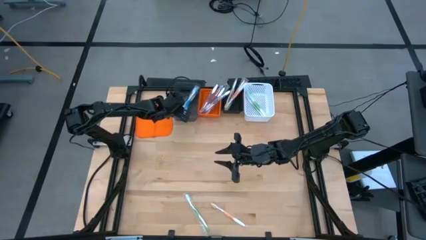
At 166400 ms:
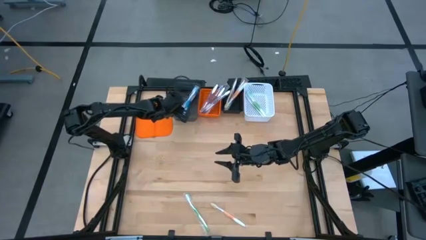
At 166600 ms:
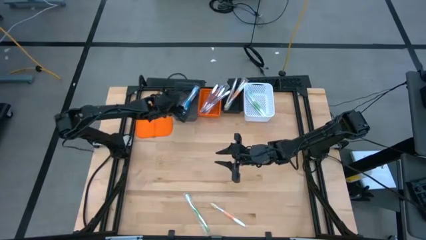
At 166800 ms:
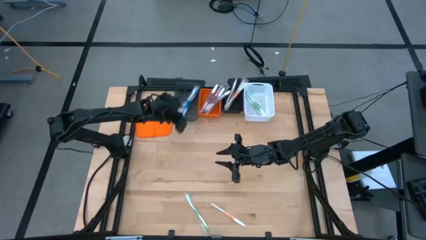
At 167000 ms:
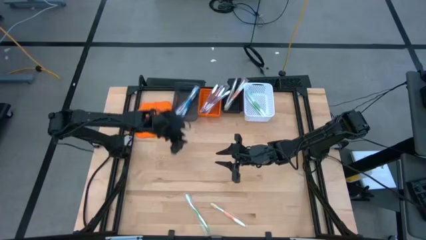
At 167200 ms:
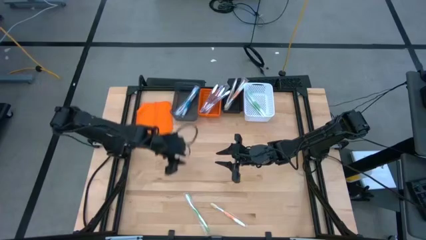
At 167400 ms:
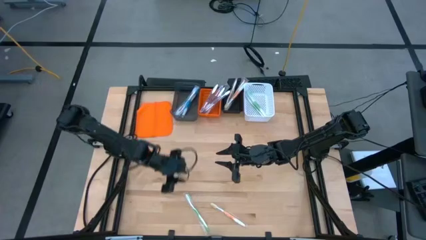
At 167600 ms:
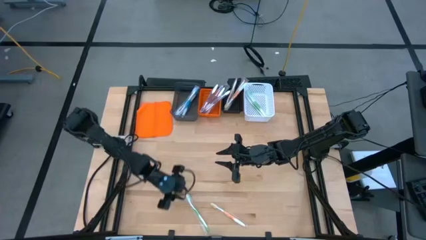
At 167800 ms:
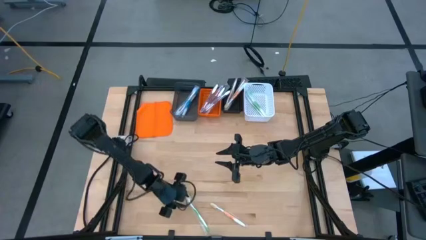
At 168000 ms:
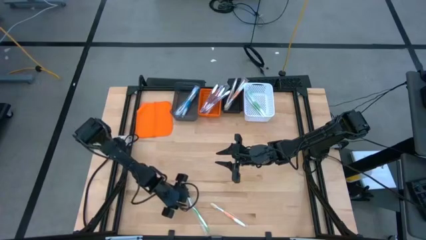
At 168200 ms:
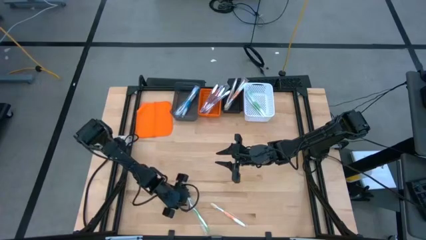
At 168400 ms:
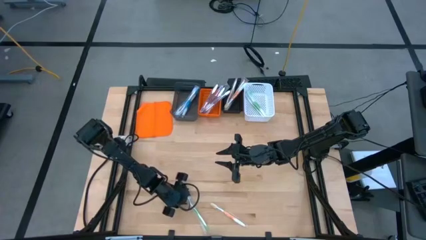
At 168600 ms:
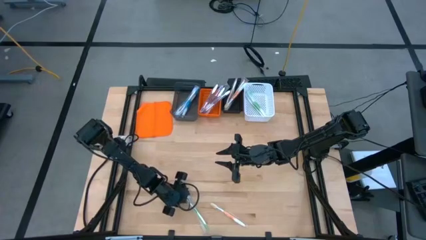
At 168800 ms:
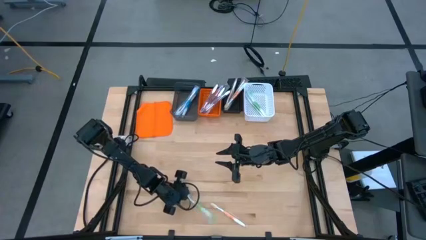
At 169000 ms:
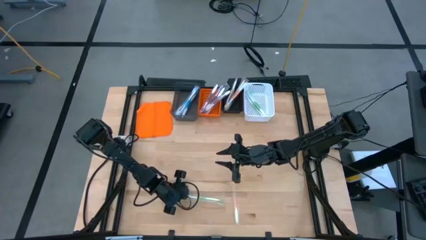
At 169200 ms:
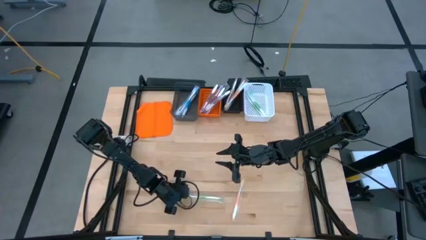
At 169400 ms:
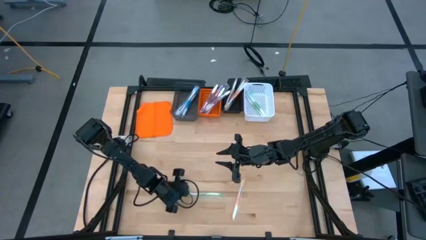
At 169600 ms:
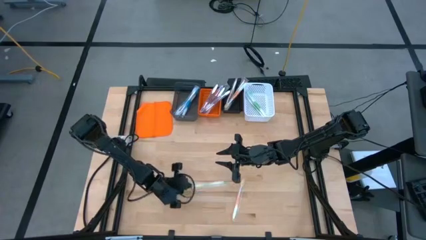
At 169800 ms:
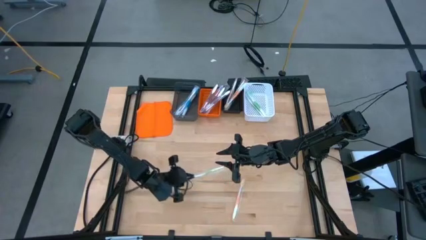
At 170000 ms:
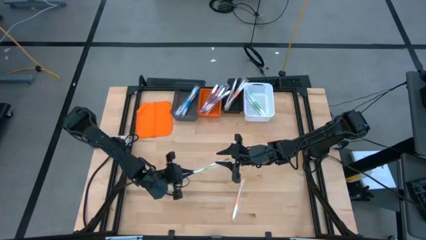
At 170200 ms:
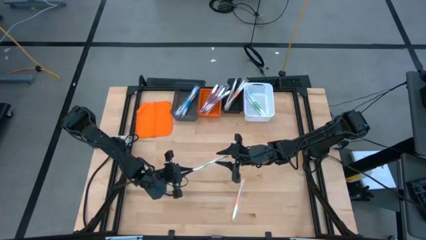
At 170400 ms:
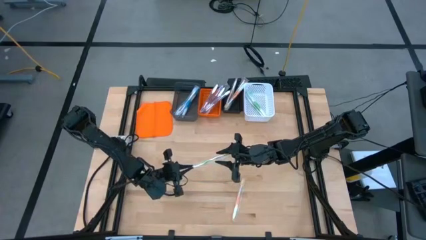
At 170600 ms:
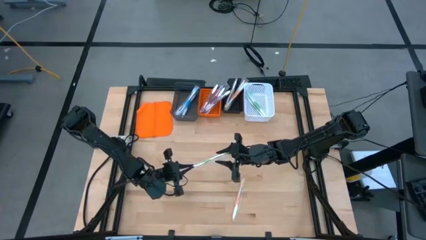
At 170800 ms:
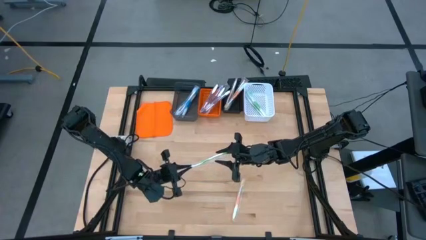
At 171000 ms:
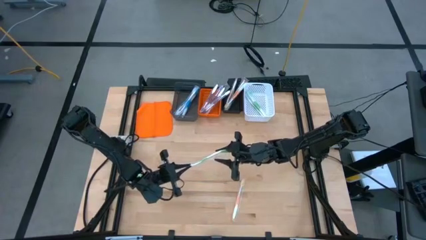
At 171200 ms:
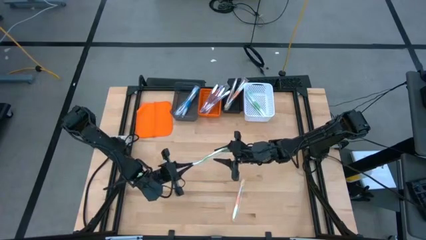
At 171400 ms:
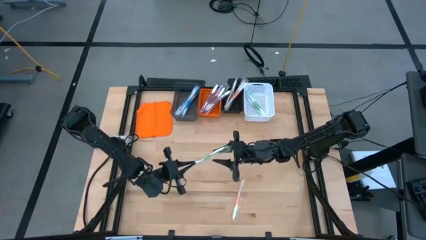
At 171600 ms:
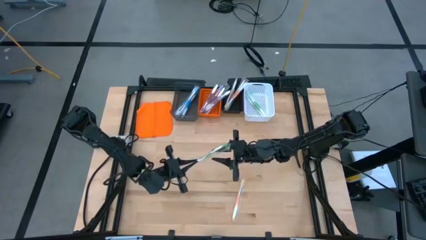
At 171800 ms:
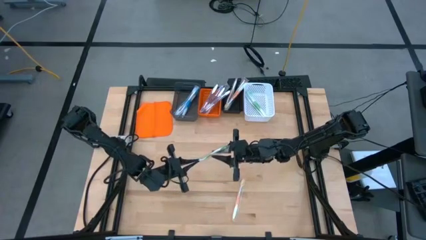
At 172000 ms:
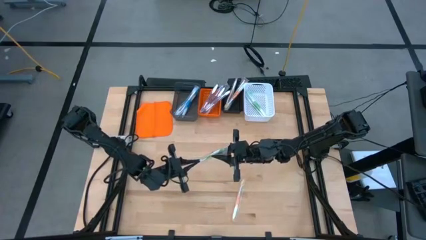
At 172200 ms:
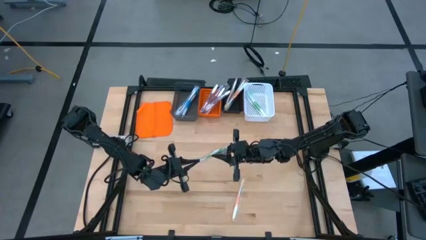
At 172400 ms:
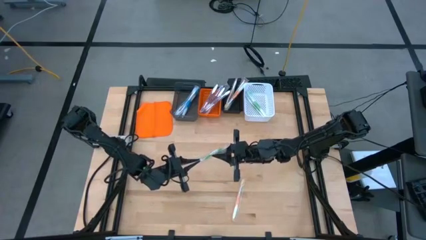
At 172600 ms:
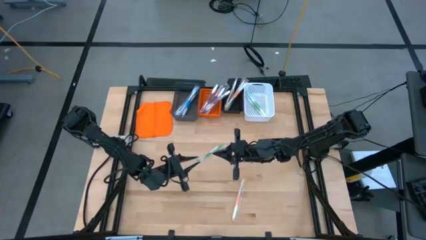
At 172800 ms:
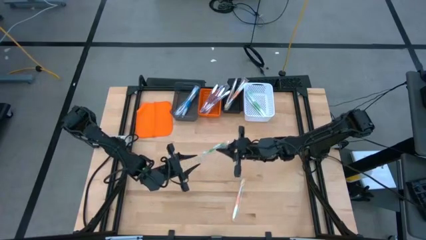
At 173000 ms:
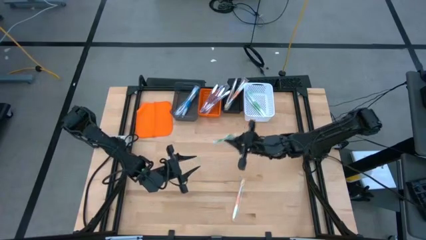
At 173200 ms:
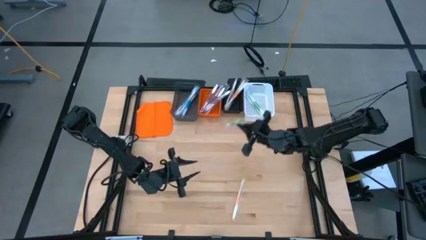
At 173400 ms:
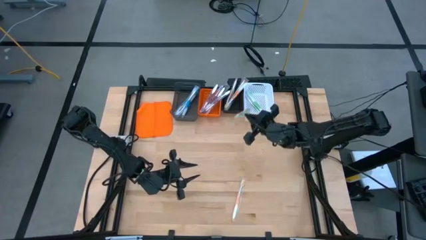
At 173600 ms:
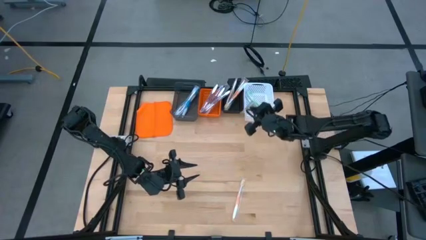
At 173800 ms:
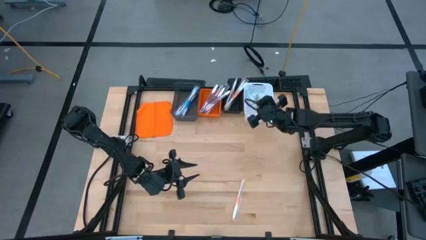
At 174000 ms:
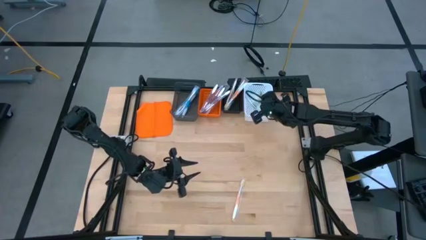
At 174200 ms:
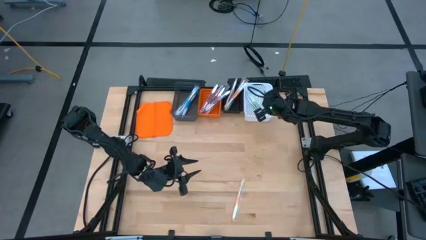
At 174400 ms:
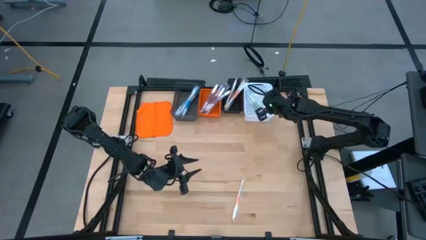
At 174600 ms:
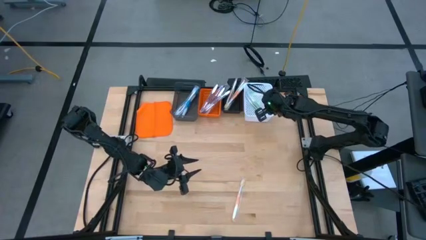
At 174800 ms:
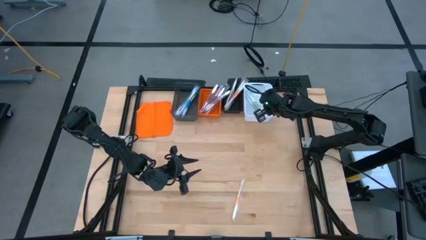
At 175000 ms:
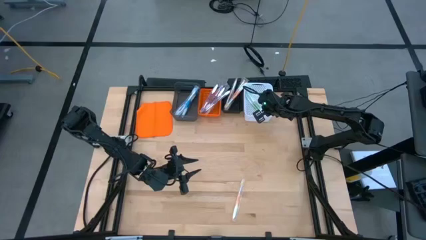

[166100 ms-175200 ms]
Task: Pick & Place Toothbrushes
Put the green toothbrush into the white bin

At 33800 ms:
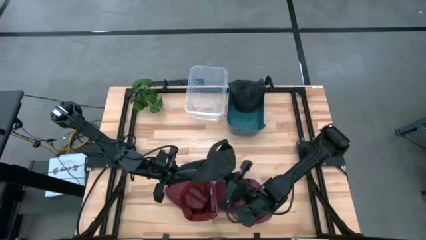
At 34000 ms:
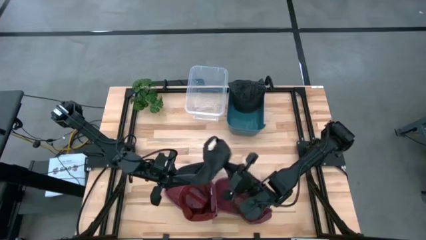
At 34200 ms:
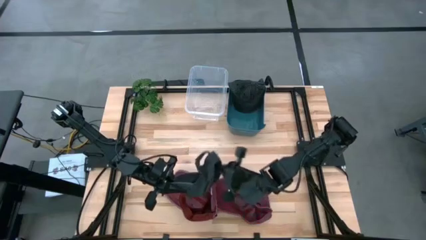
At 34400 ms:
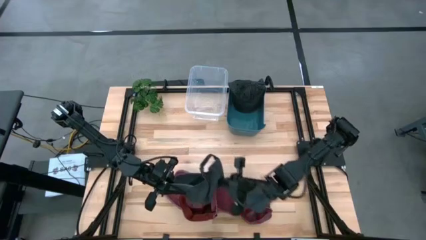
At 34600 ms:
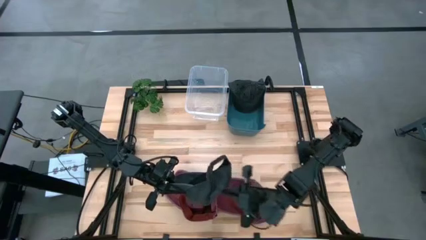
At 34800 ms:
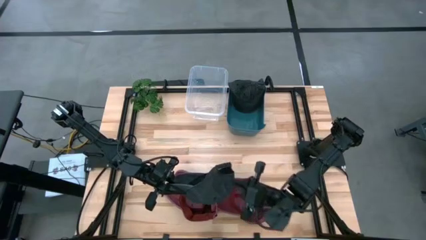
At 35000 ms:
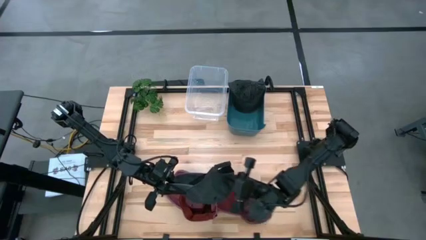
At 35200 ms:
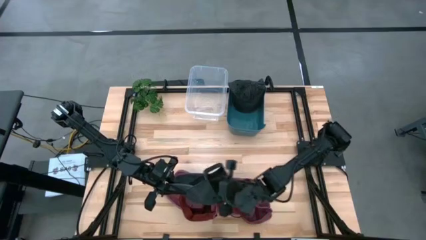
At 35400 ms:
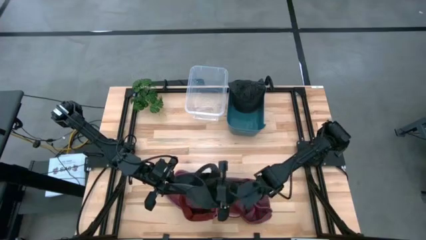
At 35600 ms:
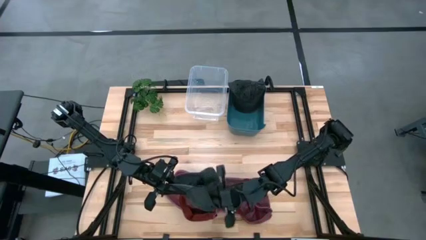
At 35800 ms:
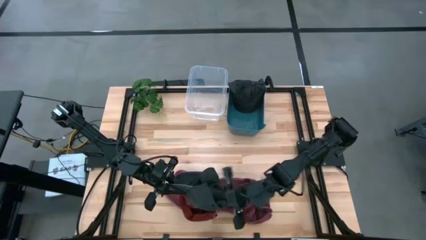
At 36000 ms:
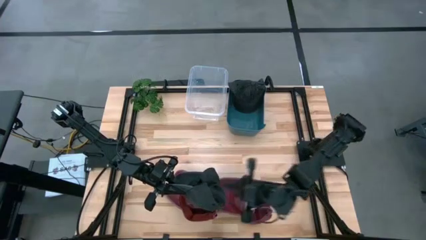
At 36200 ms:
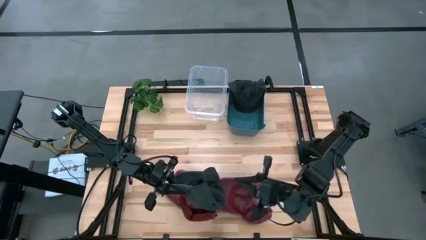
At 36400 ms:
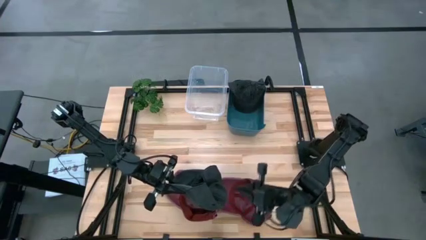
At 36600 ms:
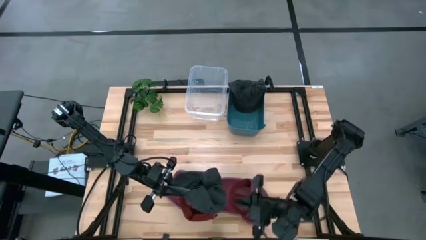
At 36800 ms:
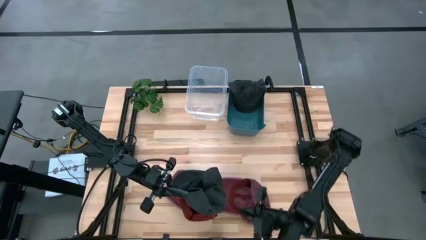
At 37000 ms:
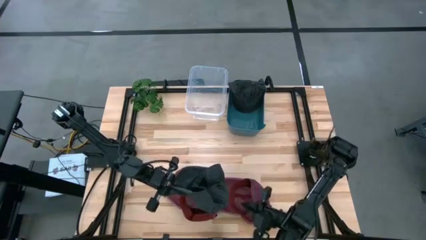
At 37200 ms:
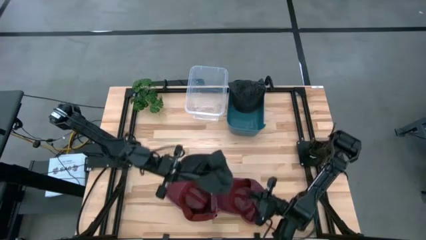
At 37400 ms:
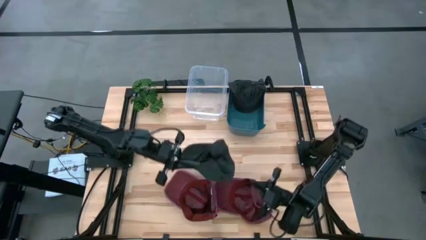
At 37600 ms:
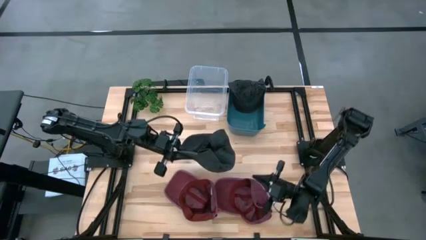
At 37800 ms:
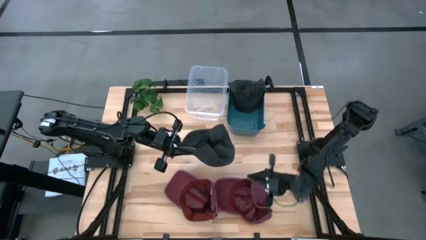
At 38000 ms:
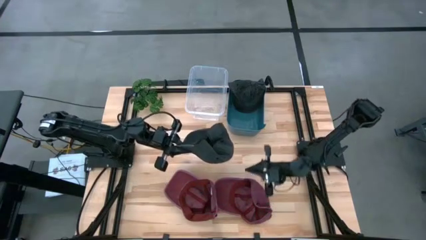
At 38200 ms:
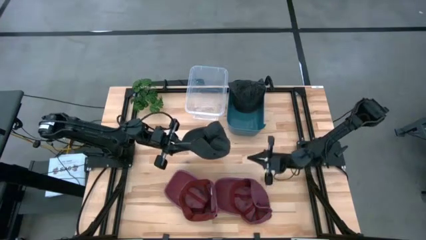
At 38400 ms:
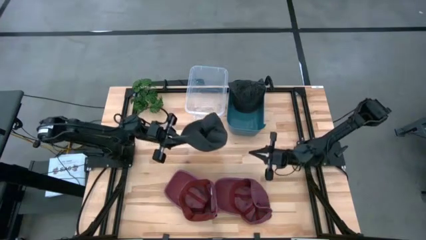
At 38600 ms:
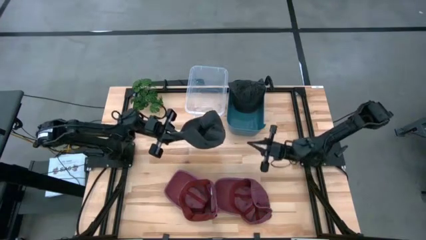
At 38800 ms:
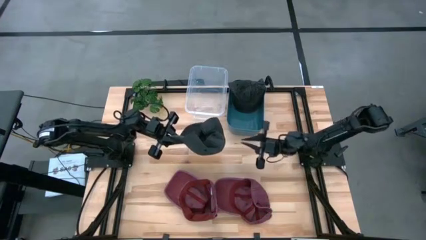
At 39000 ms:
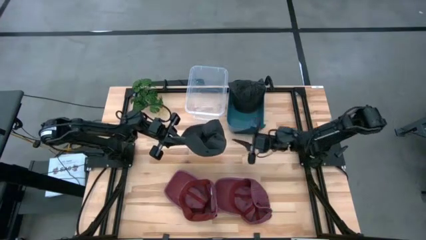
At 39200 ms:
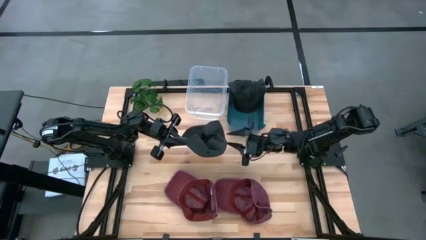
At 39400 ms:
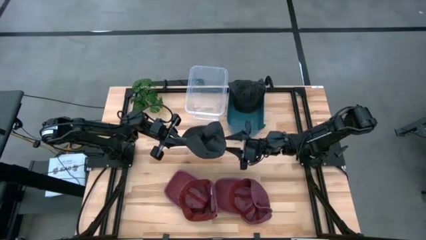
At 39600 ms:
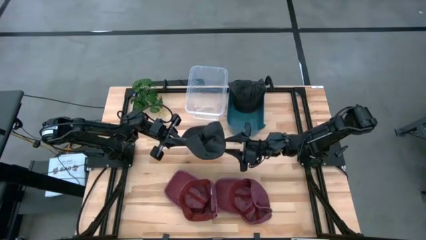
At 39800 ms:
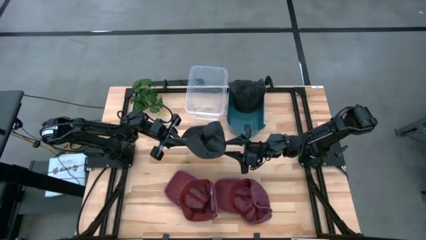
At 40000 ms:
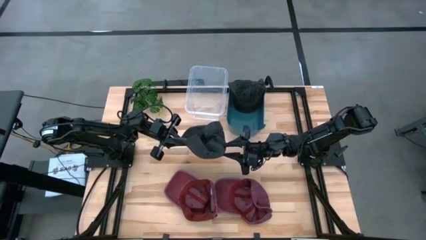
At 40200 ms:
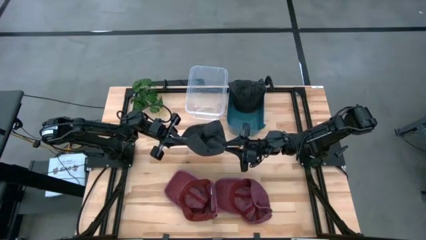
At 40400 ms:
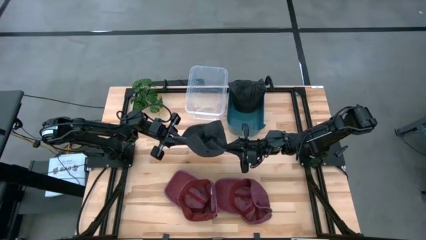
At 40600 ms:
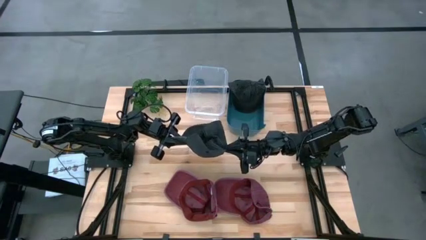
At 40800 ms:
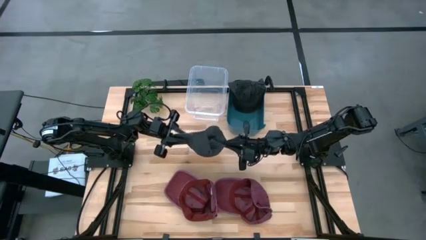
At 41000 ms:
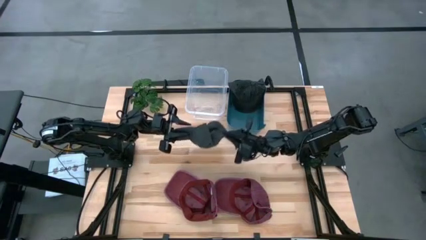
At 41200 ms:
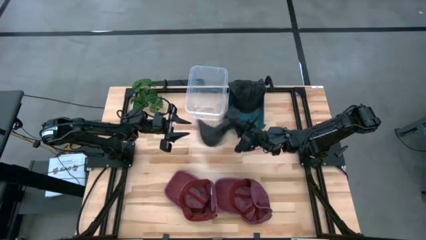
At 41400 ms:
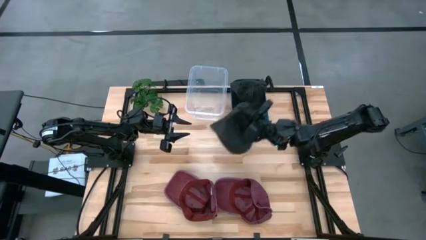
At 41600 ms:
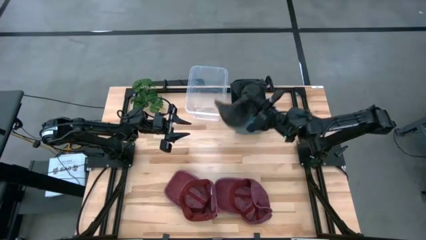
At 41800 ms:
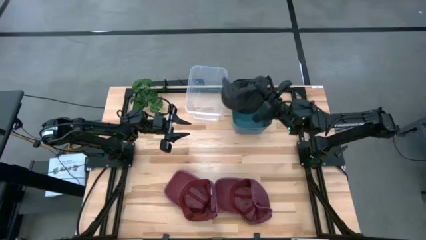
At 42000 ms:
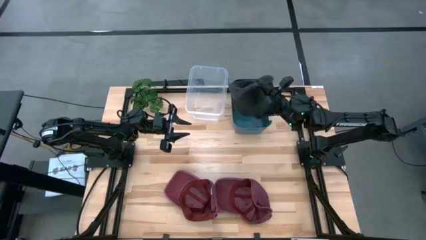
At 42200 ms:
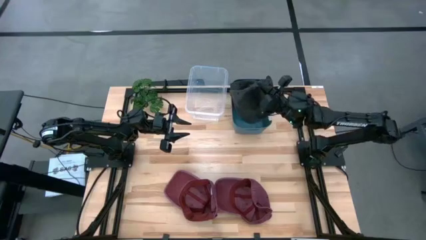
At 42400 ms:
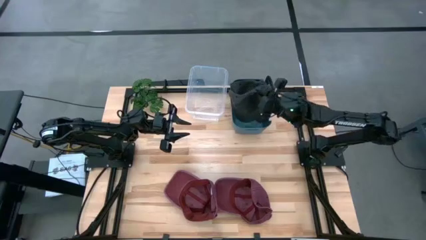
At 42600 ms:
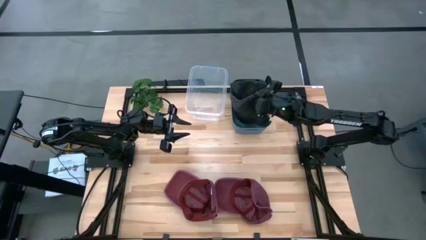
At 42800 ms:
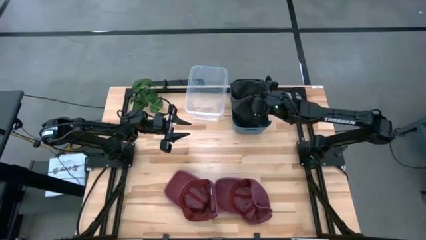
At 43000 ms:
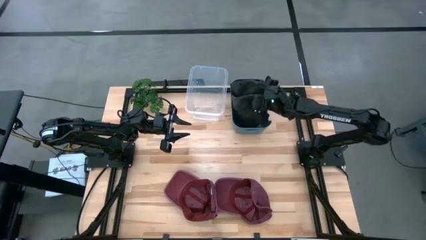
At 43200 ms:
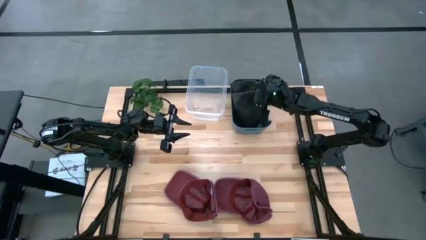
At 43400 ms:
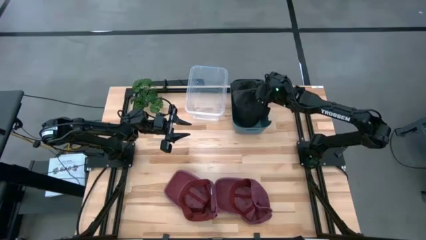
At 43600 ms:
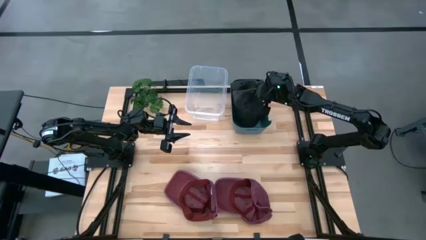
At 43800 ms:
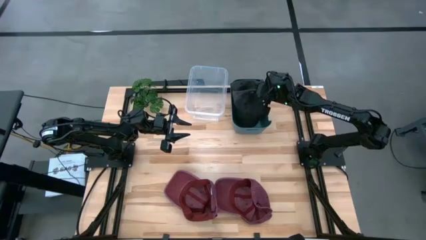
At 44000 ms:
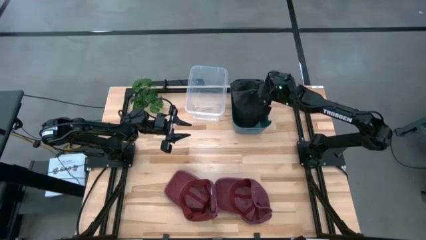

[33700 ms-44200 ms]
Task: Pick & Place hat
Put the black cap into the blue bin
